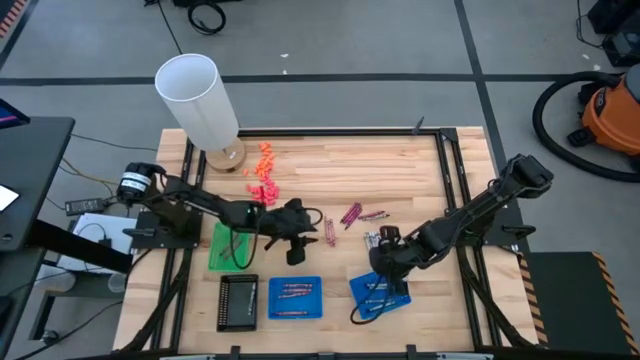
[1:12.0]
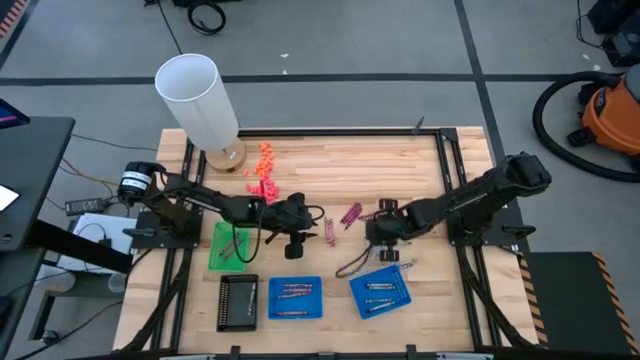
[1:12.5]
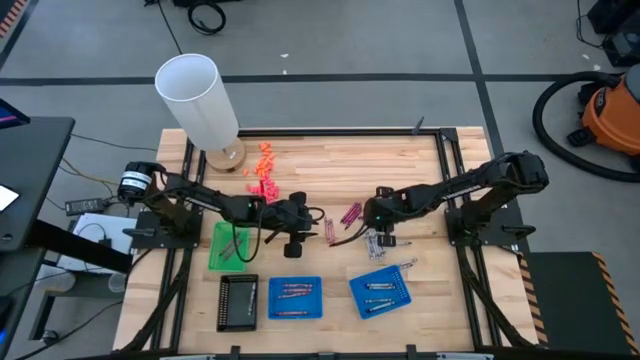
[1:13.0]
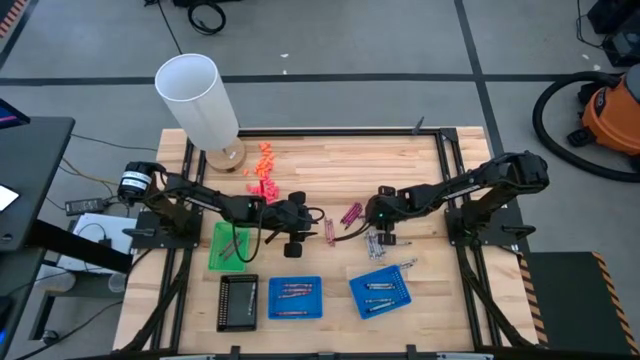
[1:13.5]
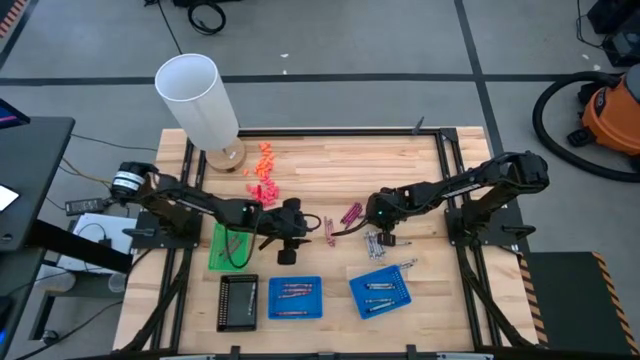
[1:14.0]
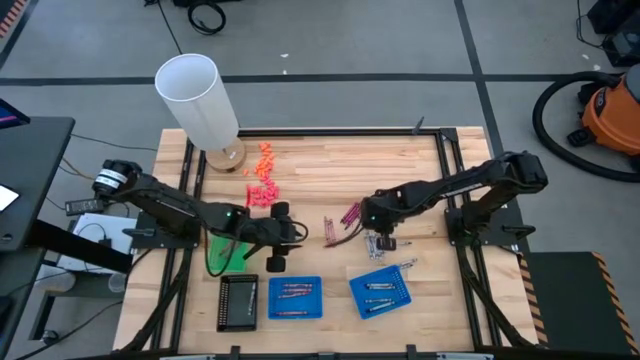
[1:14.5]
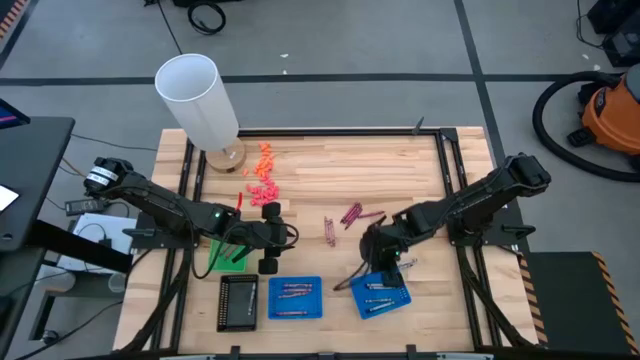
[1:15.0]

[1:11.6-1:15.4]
Task: Sort crayons
Put the black crayon into the right blue basket

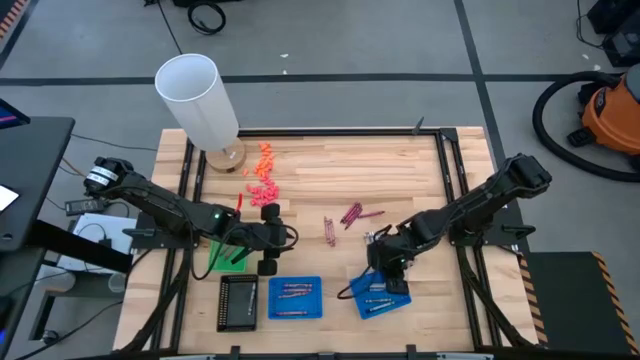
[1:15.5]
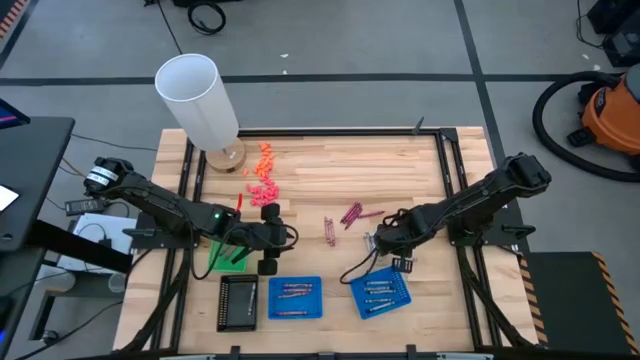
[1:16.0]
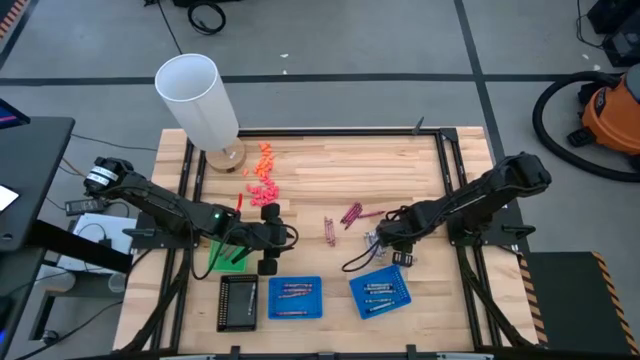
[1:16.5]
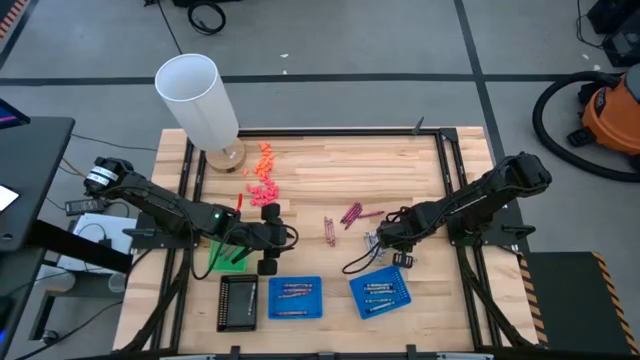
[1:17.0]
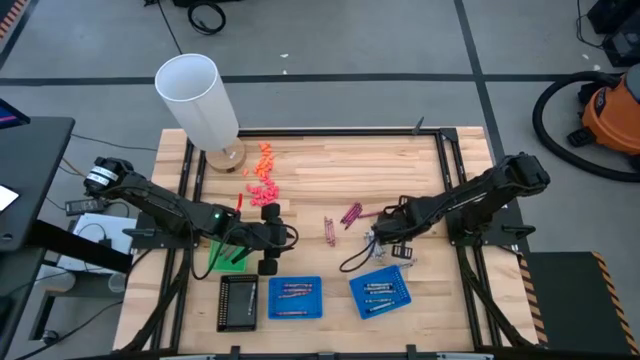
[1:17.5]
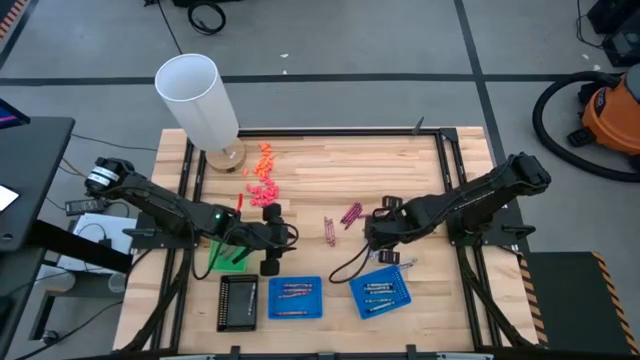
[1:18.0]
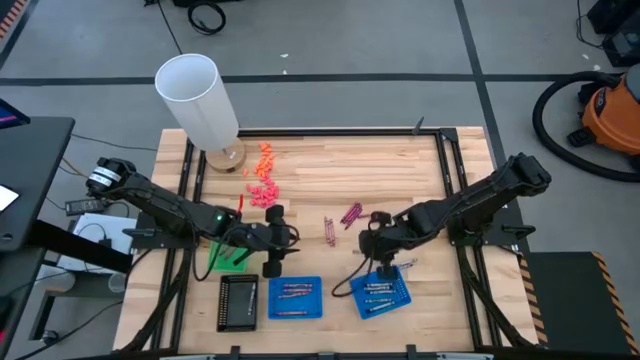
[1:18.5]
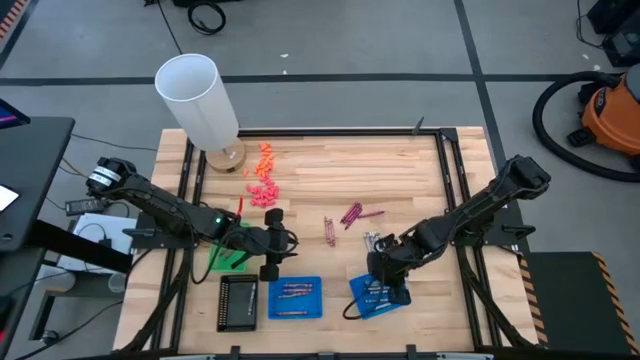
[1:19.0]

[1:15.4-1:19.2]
Put the black crayon into the right blue basket

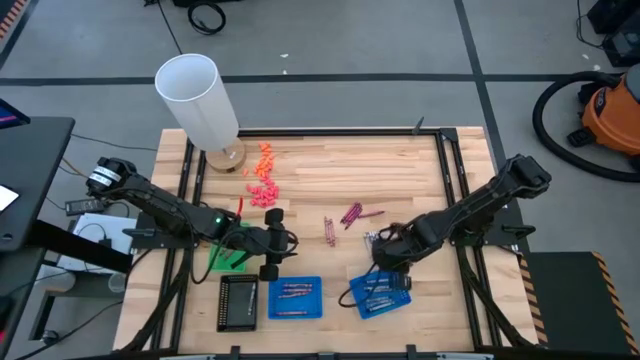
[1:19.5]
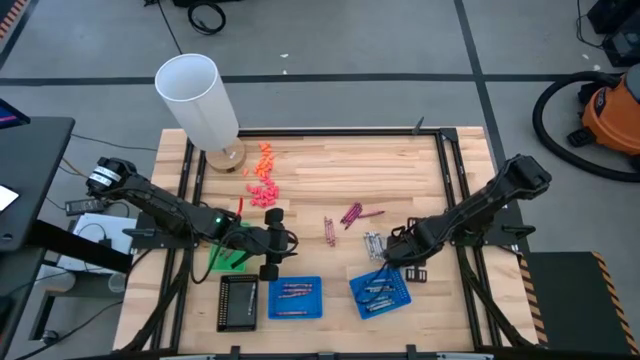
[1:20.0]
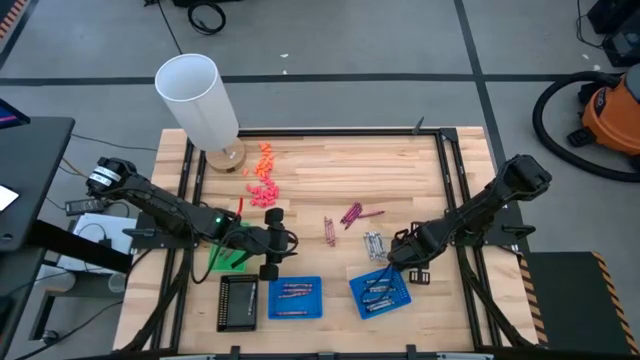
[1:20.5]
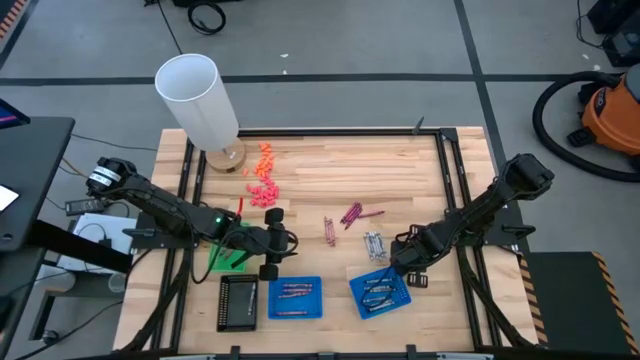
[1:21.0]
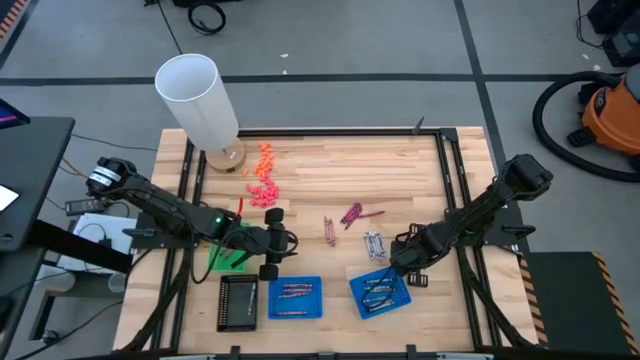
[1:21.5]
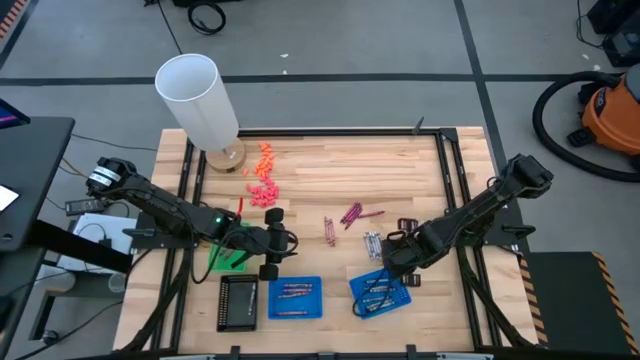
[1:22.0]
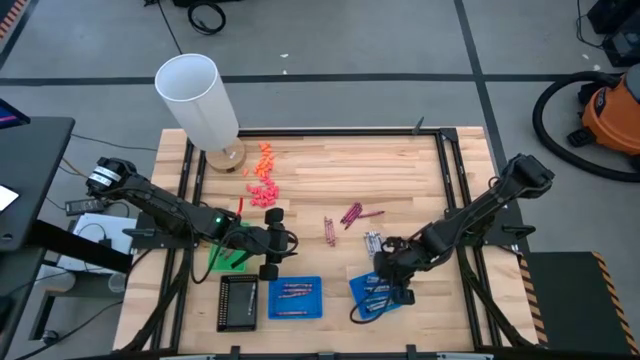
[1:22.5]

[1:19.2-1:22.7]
Put the black crayon into the right blue basket

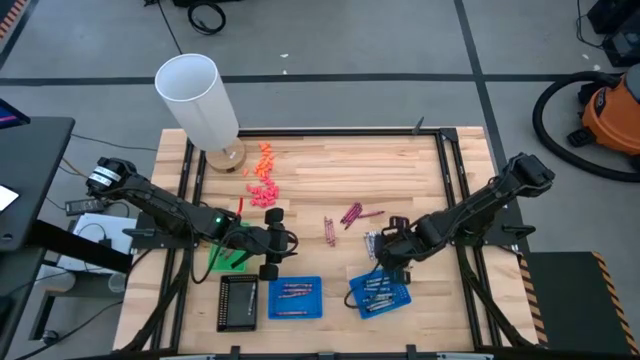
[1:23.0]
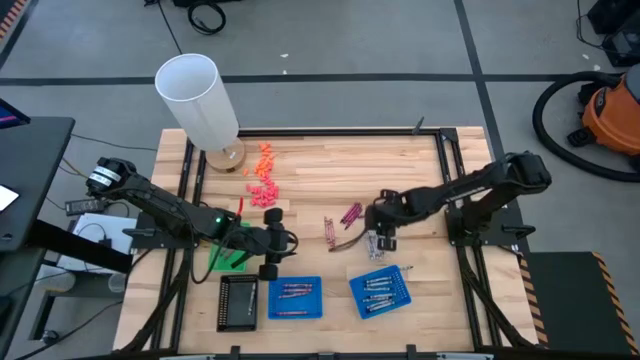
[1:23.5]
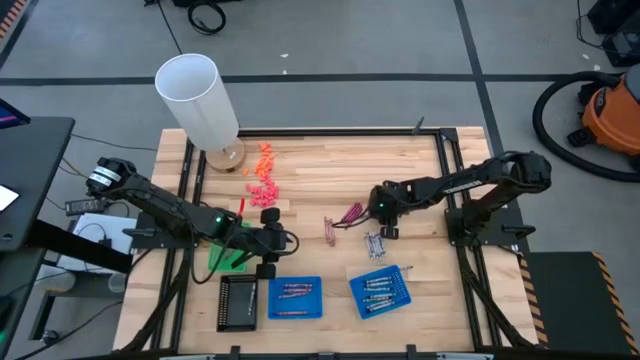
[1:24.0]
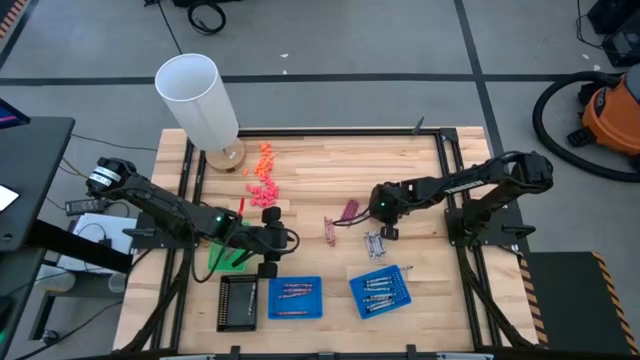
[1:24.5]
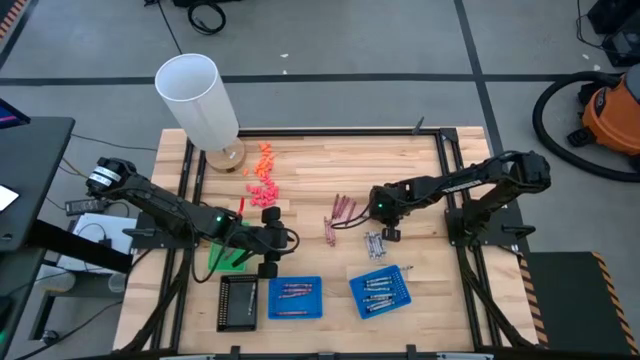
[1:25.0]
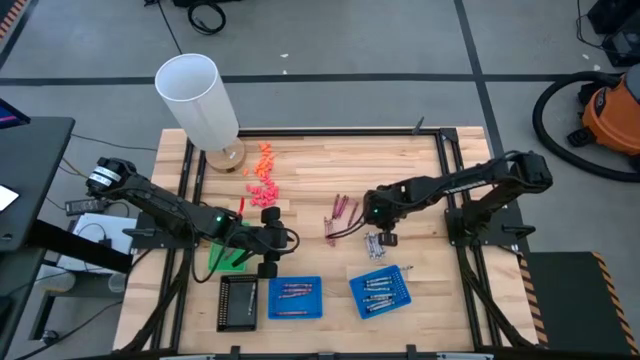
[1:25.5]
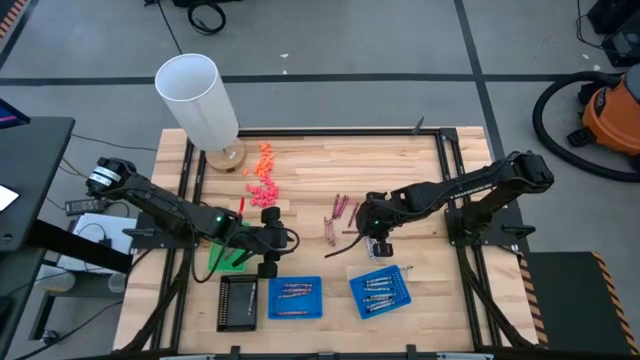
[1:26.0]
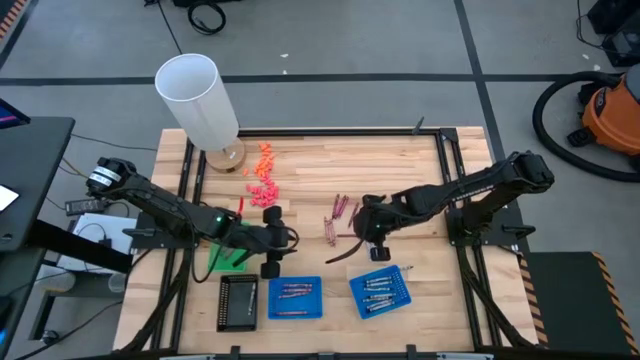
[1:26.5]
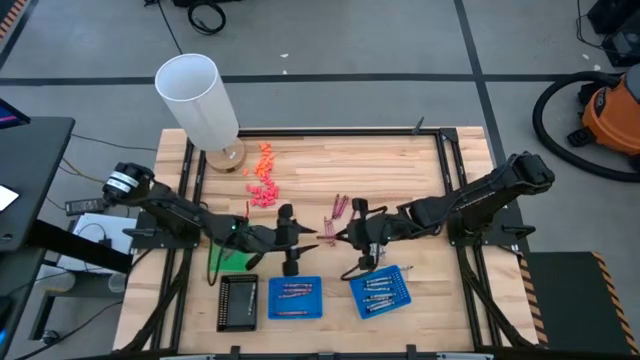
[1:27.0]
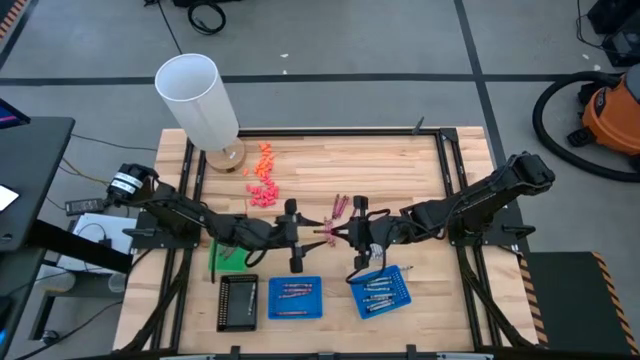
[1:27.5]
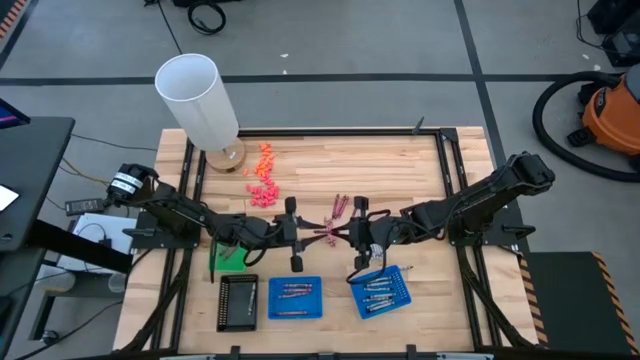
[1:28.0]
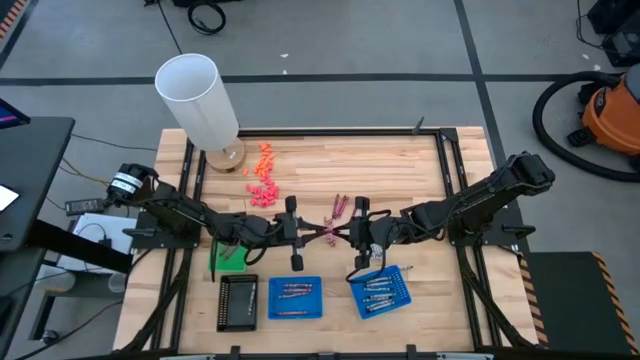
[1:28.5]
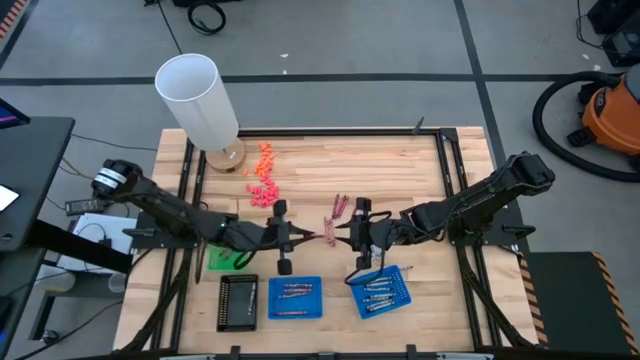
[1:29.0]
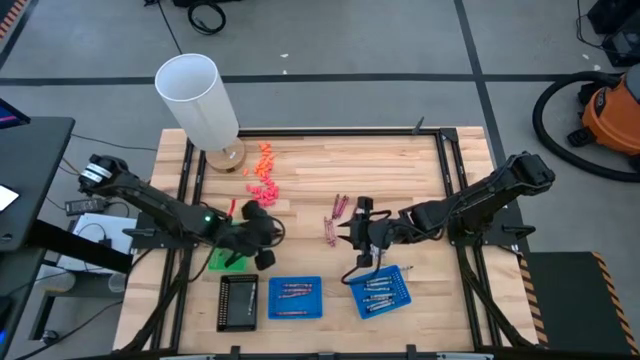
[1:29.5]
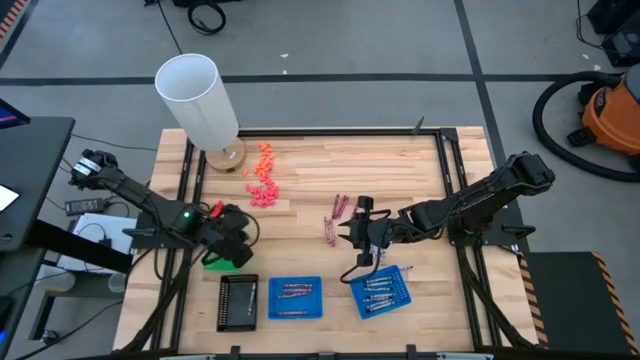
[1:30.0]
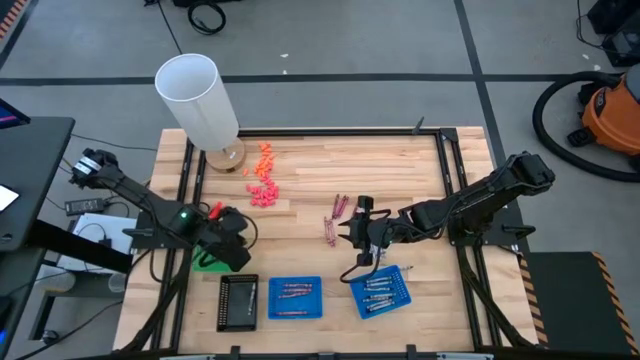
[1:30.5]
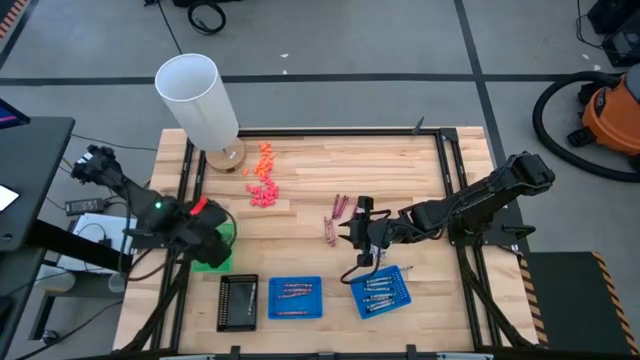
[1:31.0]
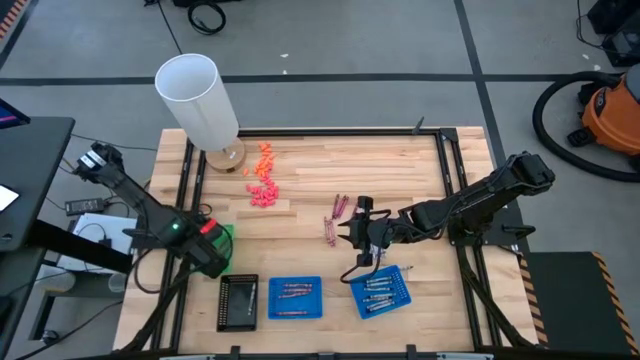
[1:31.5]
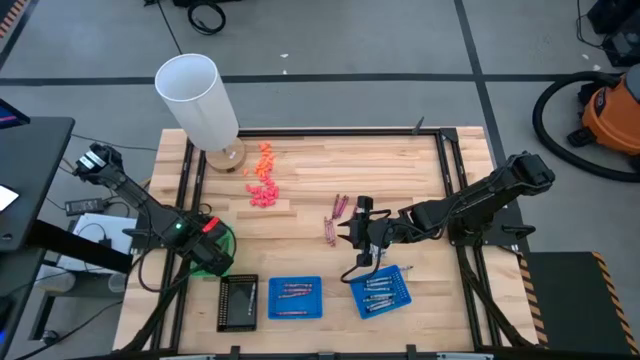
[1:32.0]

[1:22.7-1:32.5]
Put the red crayon into the green basket

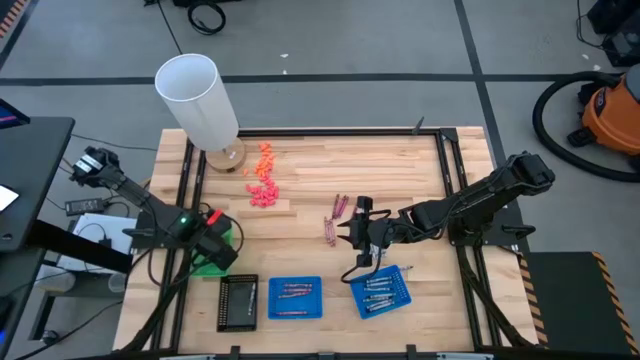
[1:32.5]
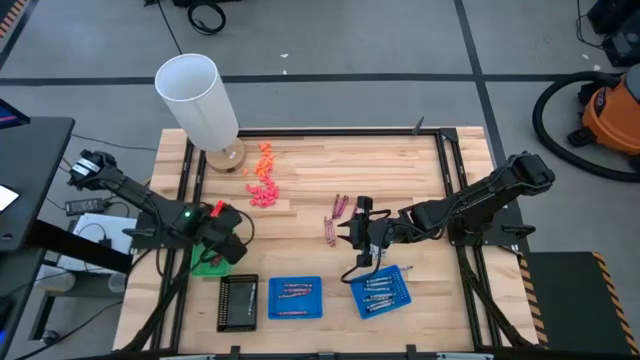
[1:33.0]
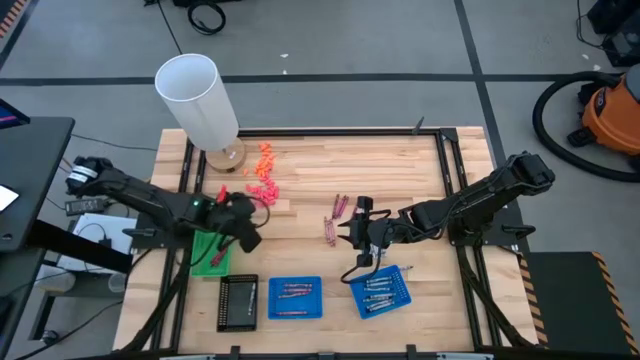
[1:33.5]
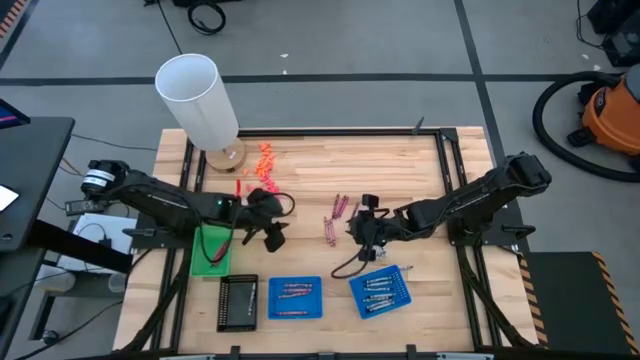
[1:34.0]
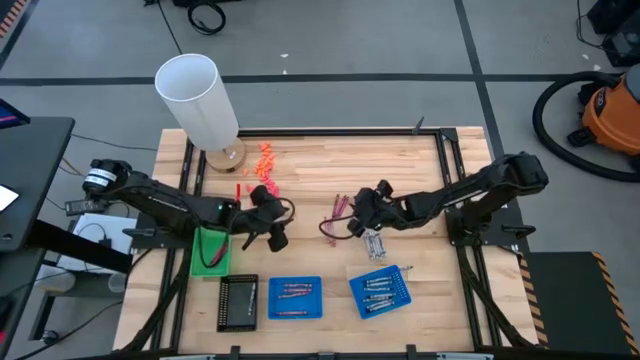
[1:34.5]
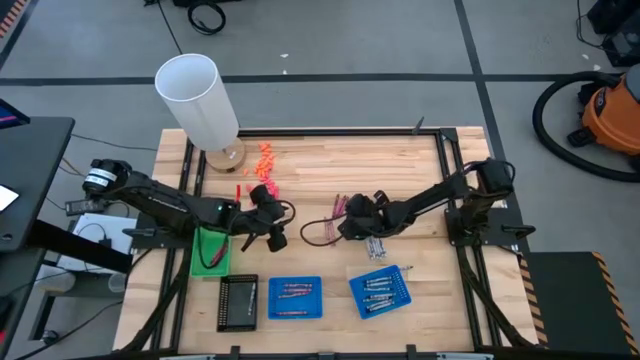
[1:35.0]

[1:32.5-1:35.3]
Put the red crayon into the green basket
